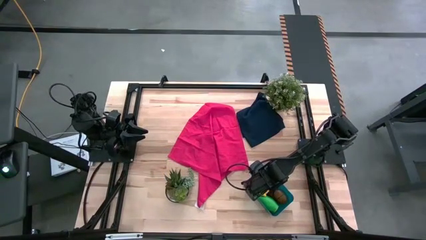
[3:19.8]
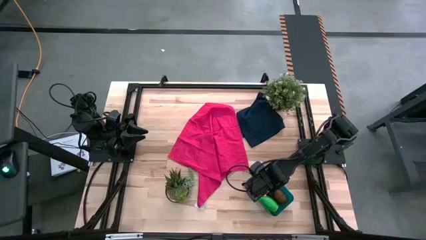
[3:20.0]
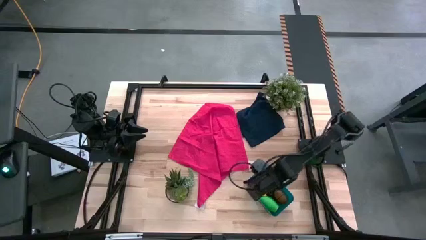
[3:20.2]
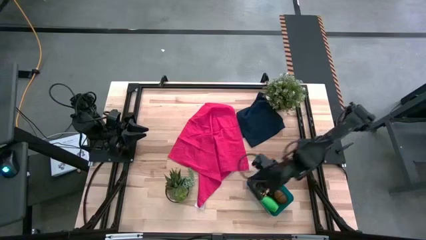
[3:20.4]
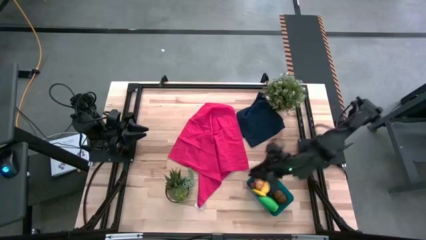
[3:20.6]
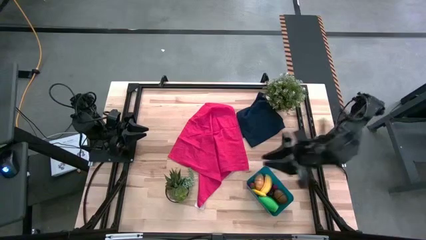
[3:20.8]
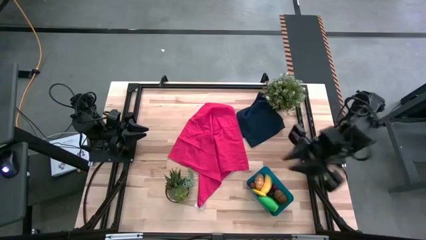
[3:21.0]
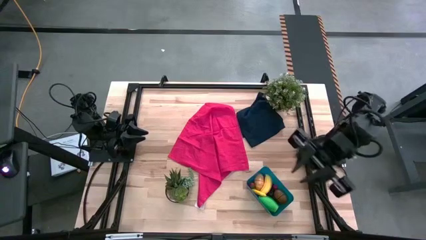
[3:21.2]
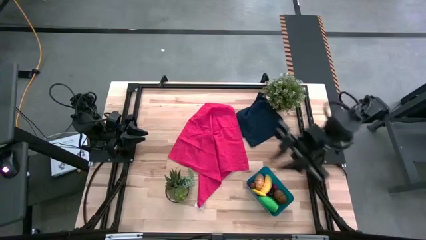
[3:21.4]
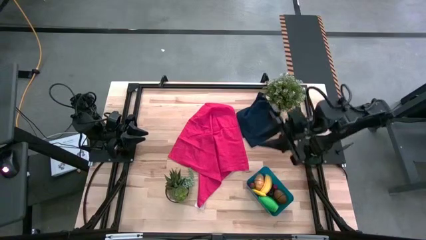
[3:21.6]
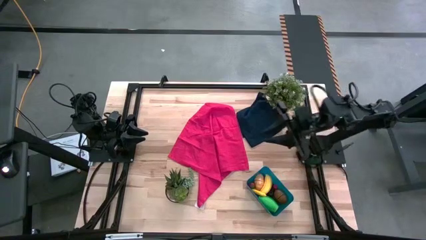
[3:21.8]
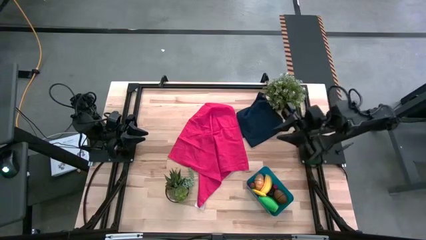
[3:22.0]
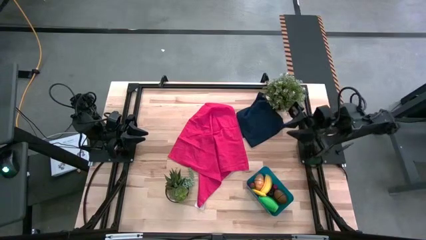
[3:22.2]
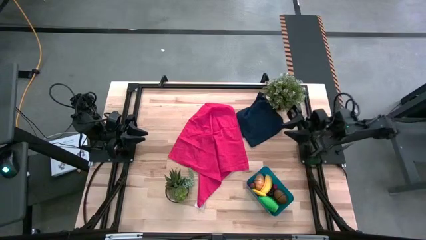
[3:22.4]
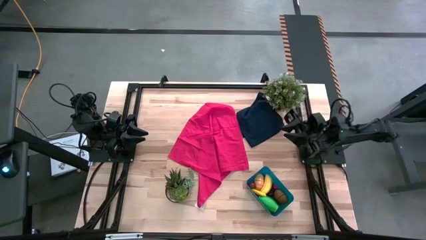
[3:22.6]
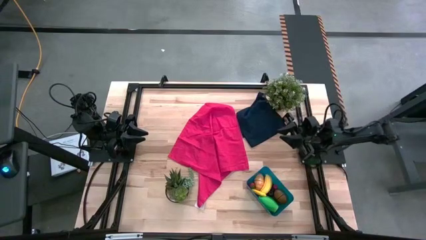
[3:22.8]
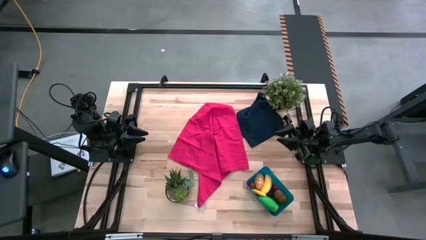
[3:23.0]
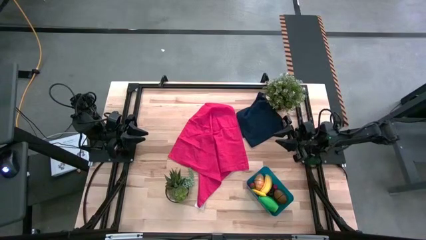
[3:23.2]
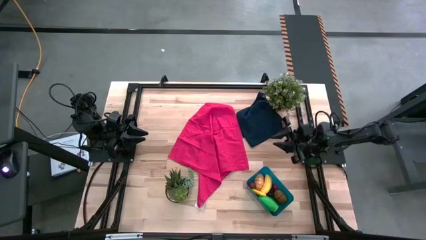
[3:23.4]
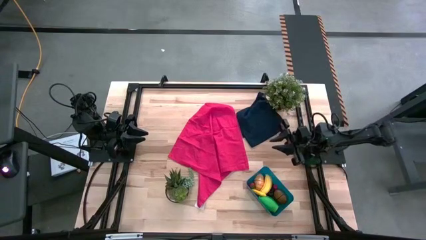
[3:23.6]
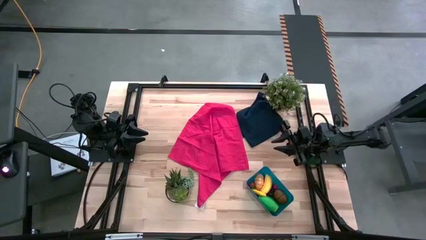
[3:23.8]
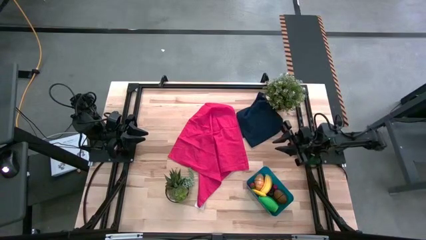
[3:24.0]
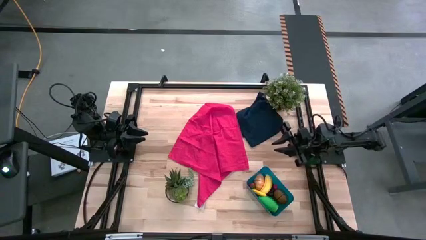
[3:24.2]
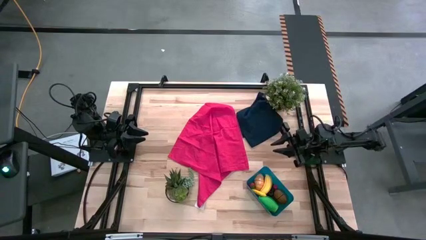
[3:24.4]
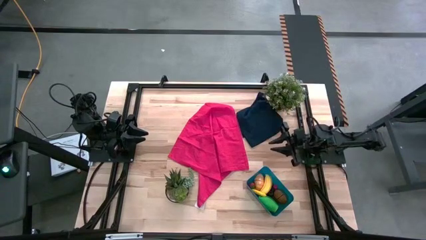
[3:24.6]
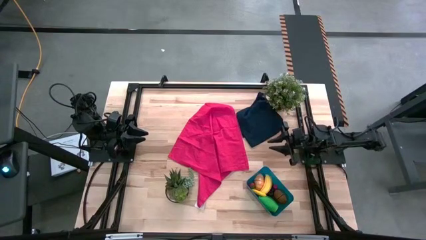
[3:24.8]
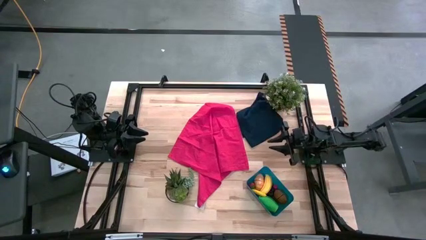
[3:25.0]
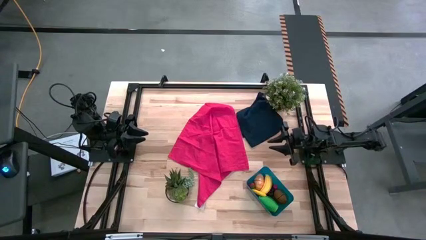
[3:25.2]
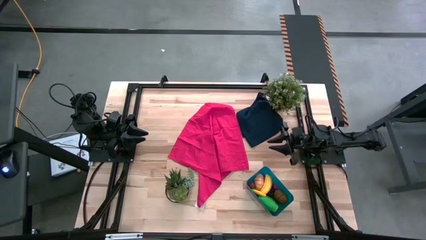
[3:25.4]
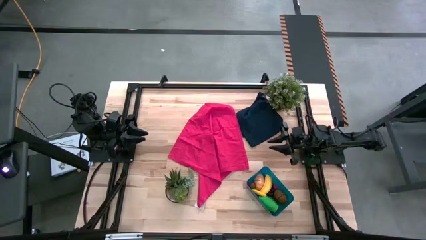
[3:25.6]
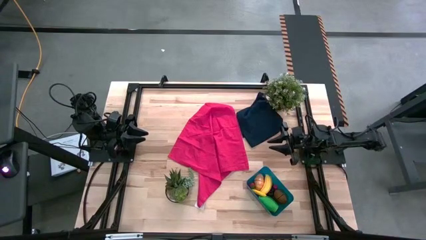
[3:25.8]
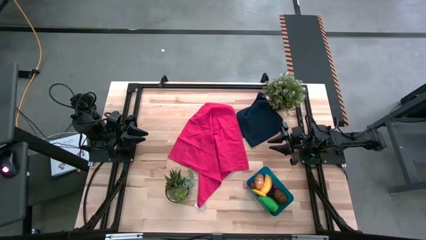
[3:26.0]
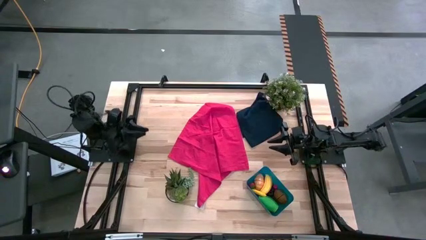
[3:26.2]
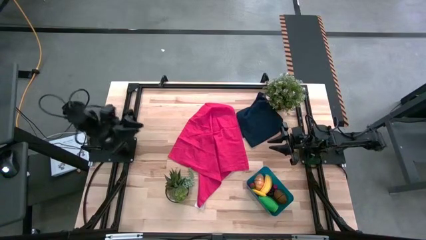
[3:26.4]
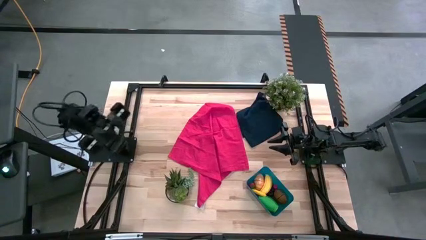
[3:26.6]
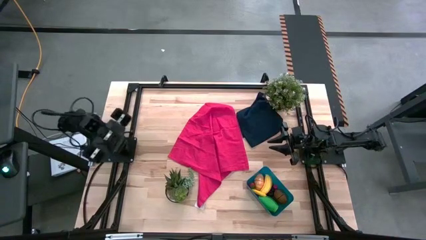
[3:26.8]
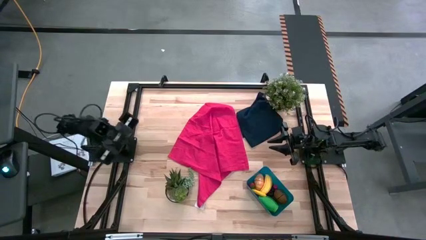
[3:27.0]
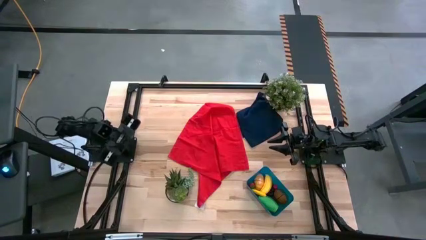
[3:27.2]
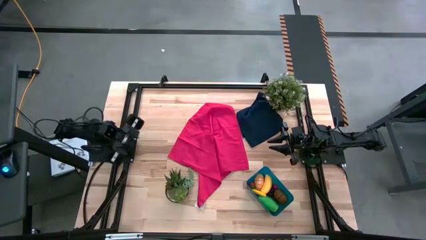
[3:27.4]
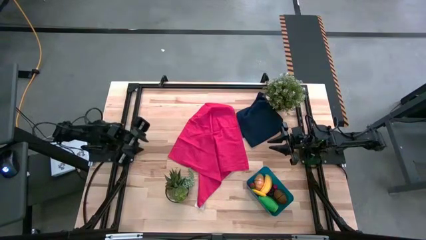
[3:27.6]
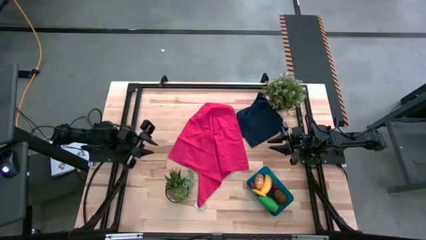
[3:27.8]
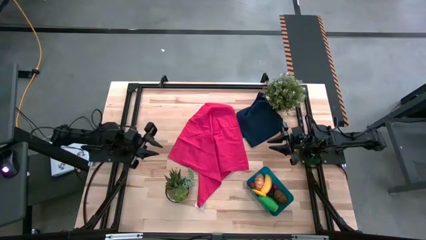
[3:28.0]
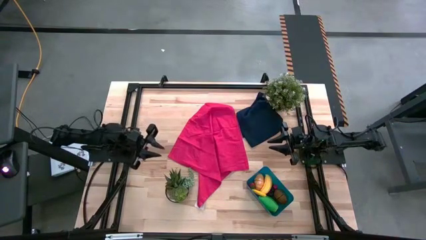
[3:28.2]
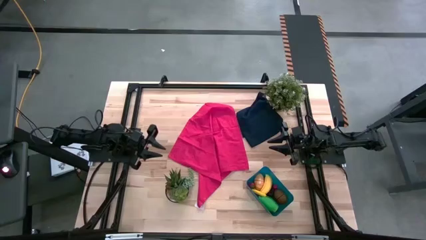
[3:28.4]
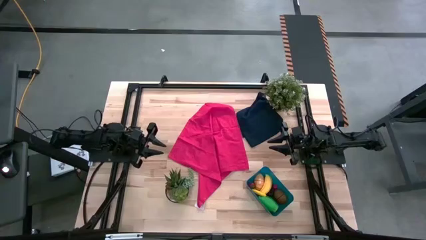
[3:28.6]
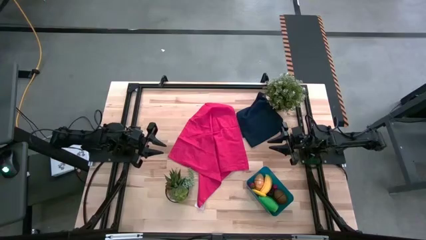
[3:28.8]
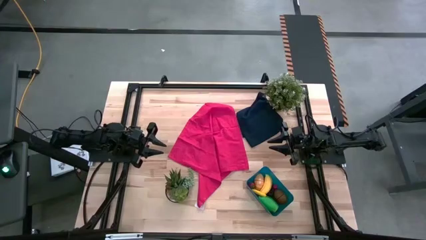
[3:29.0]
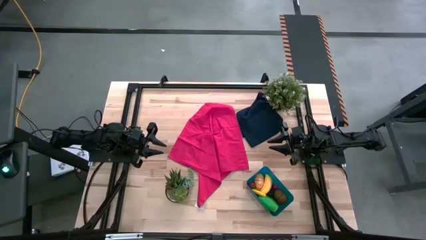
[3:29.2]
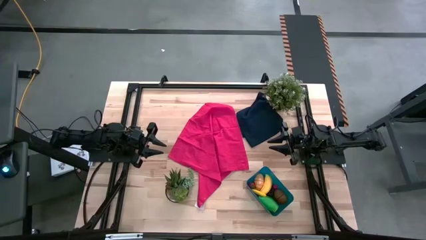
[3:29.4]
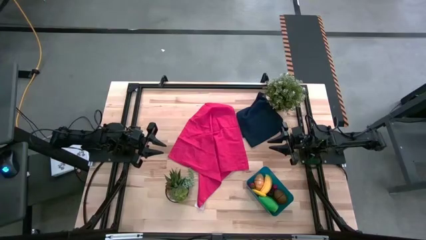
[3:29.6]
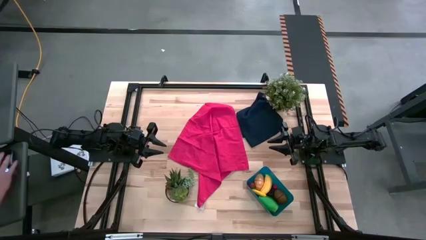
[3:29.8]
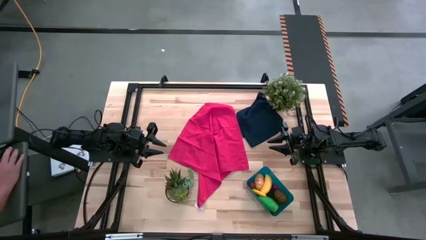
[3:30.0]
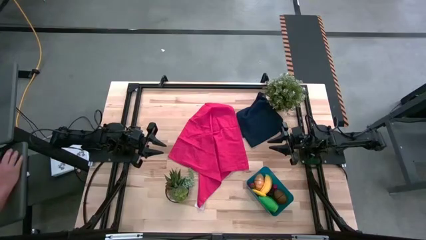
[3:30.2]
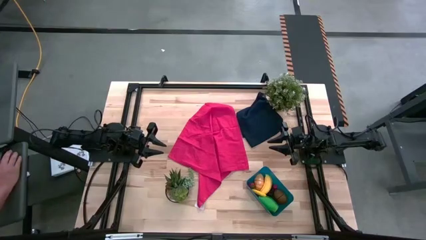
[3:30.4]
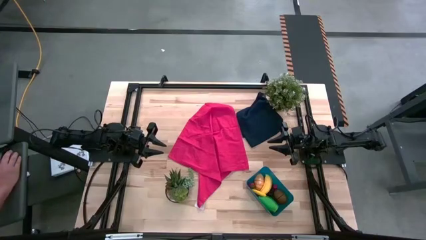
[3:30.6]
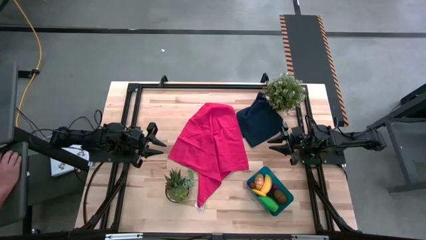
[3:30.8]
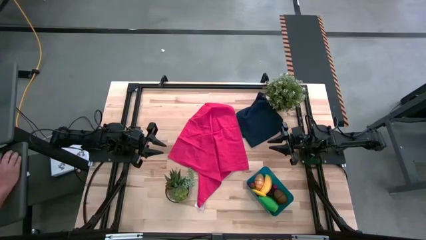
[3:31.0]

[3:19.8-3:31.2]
Task: Pick and placing Produce into tupperware
Return to Home Position
